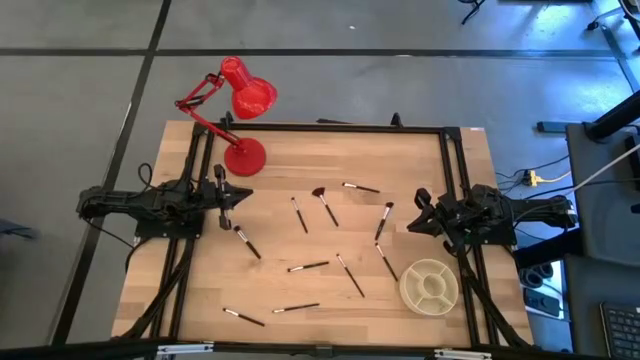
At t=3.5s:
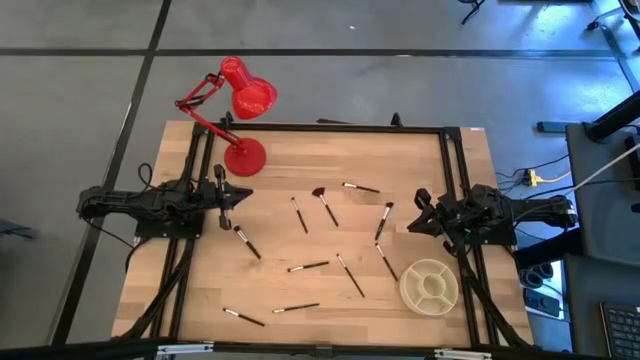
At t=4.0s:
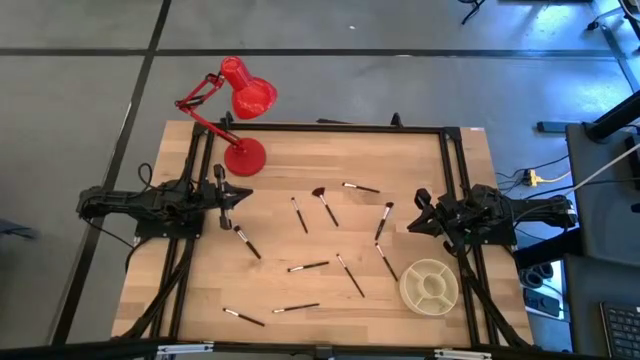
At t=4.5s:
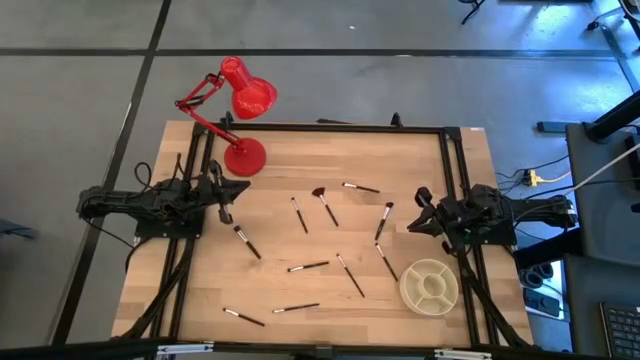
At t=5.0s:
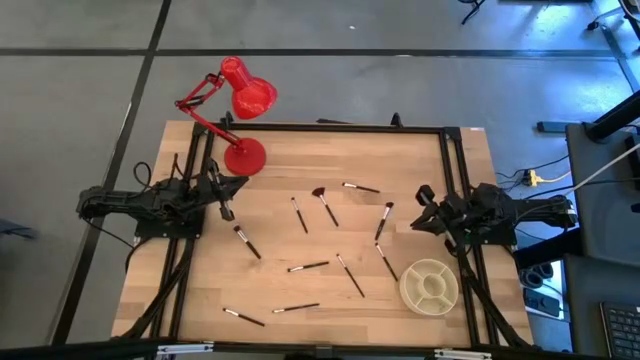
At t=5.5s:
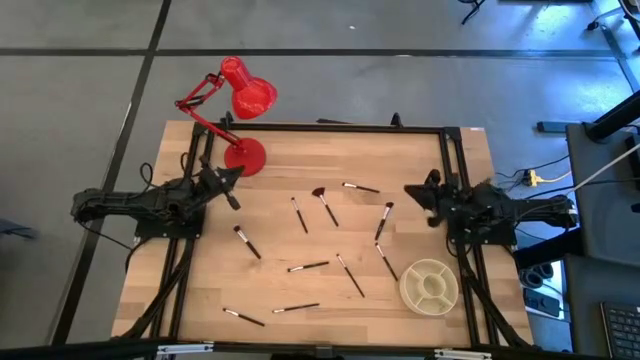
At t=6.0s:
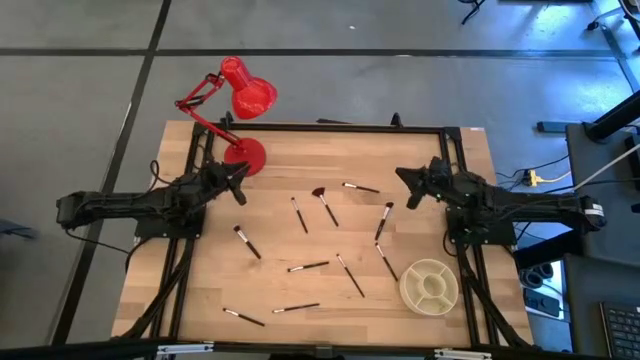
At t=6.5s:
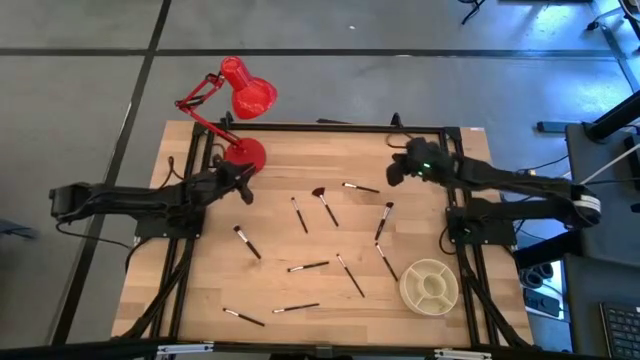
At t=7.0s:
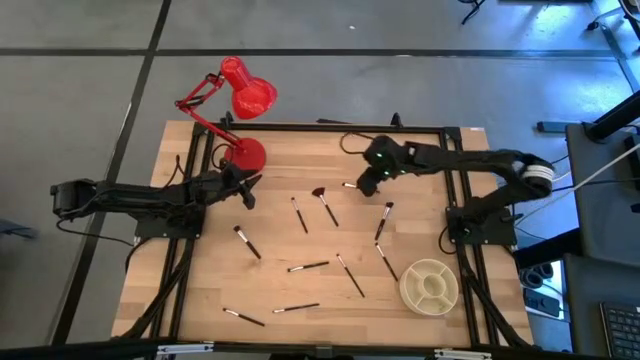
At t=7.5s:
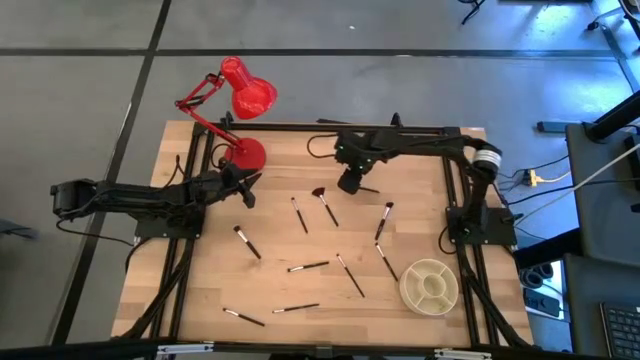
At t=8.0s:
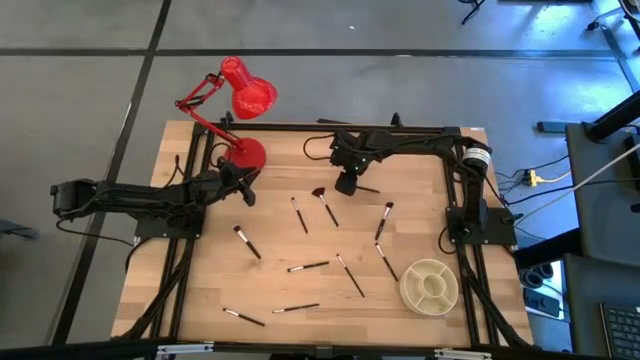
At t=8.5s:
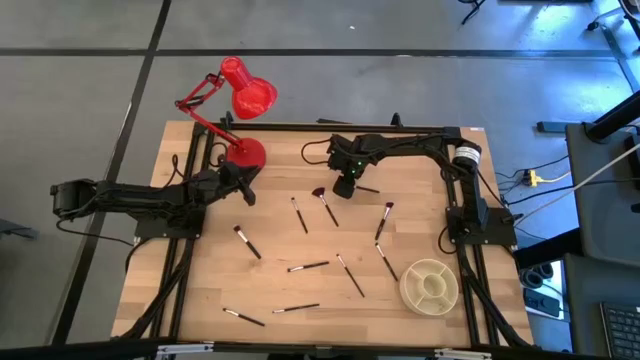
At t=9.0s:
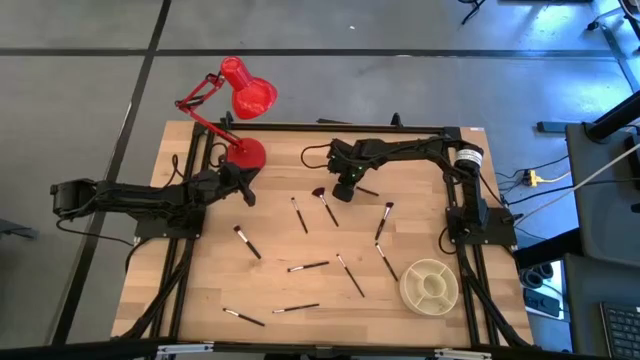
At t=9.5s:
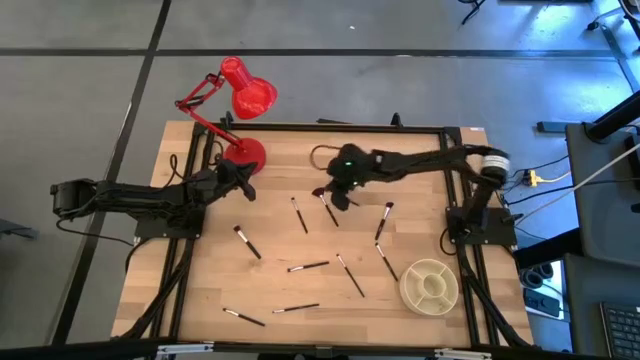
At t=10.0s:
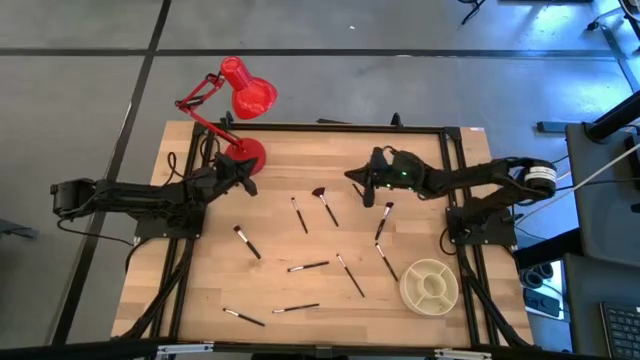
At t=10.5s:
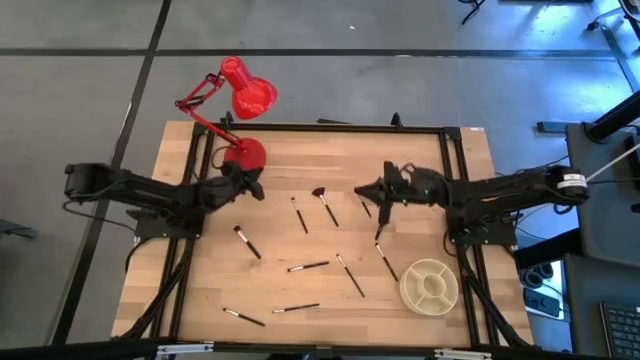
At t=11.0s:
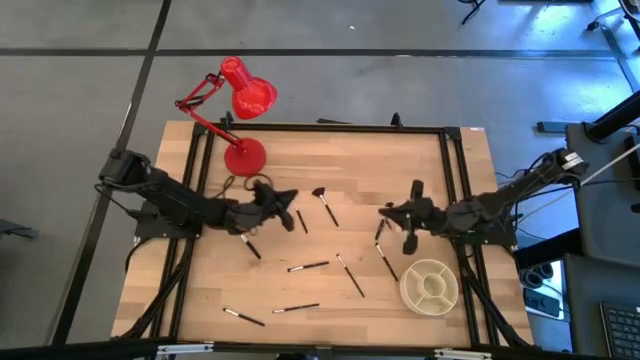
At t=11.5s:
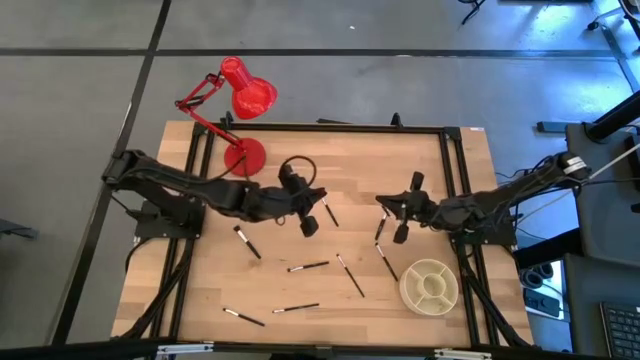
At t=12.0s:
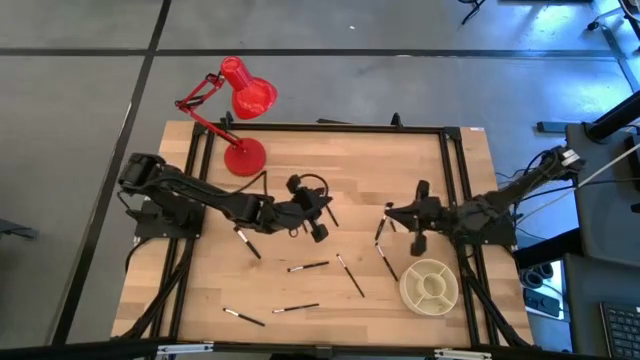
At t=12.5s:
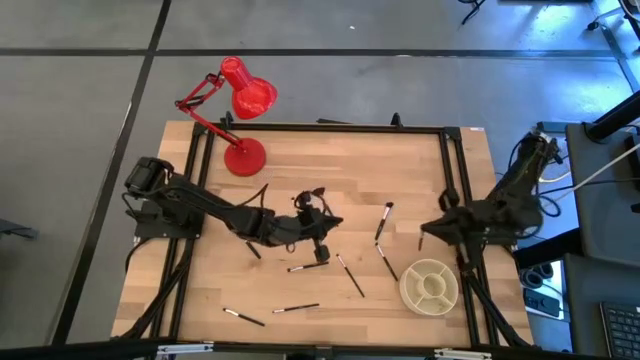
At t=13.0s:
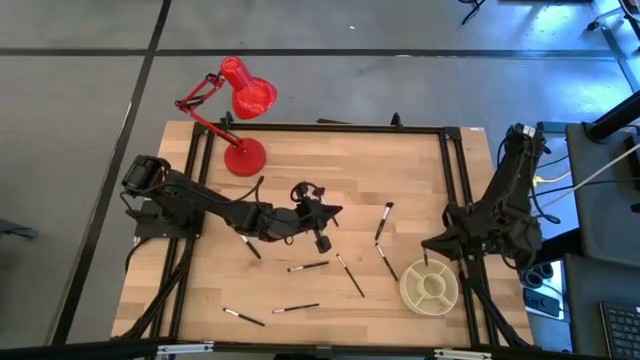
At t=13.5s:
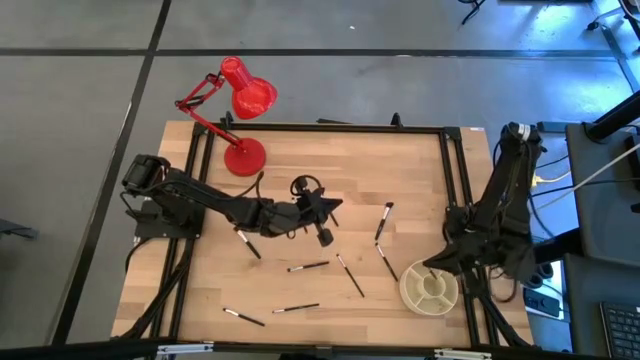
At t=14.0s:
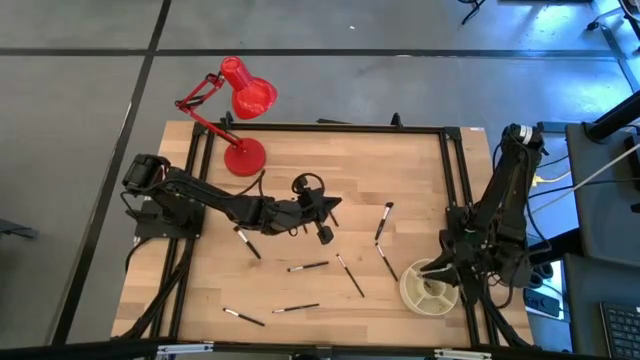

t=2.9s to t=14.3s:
Task: Sort items
Put the eyeshadow brush into the brush organizer

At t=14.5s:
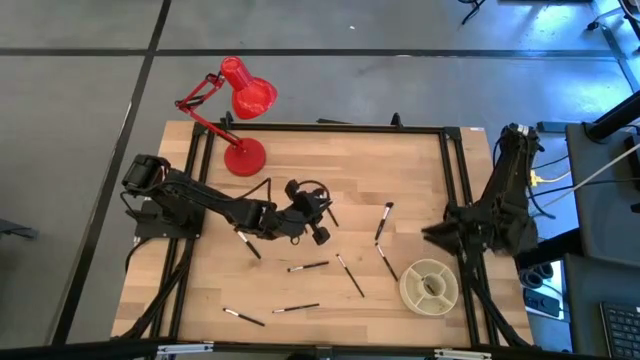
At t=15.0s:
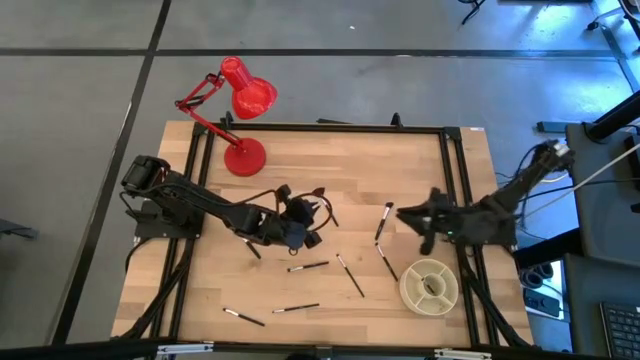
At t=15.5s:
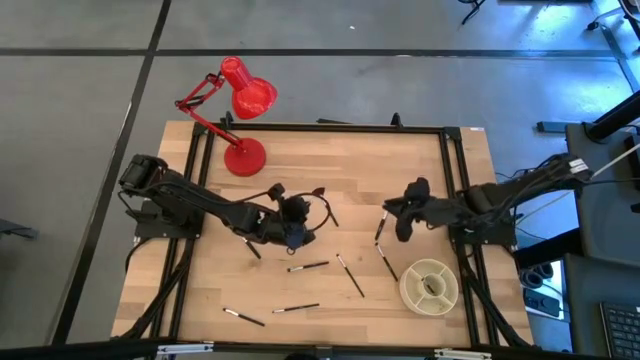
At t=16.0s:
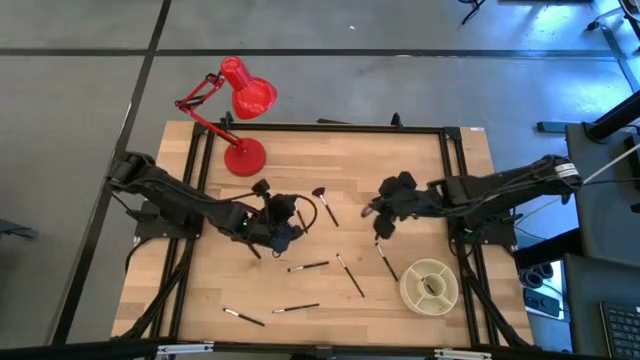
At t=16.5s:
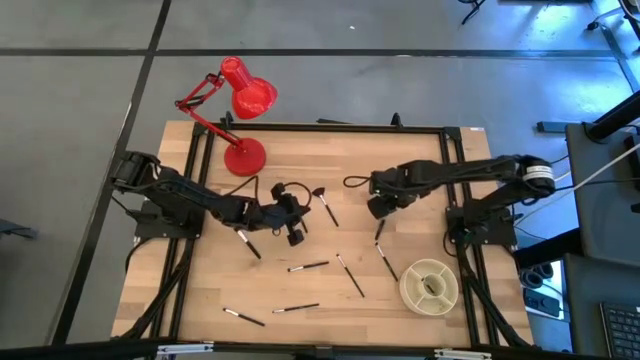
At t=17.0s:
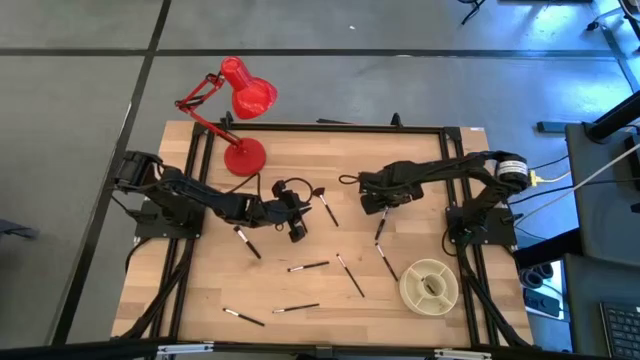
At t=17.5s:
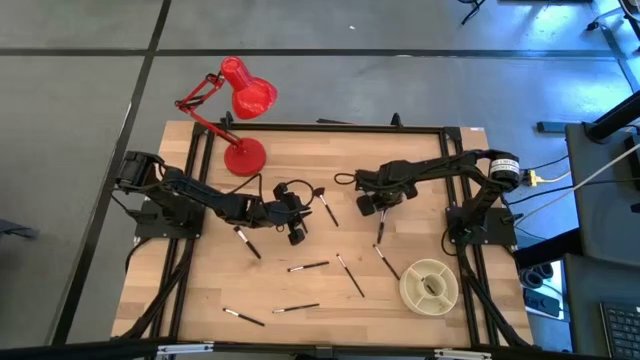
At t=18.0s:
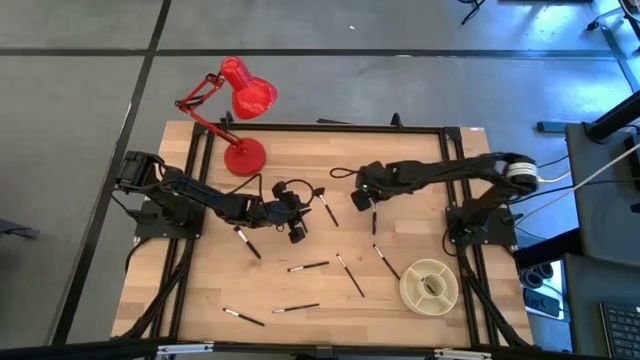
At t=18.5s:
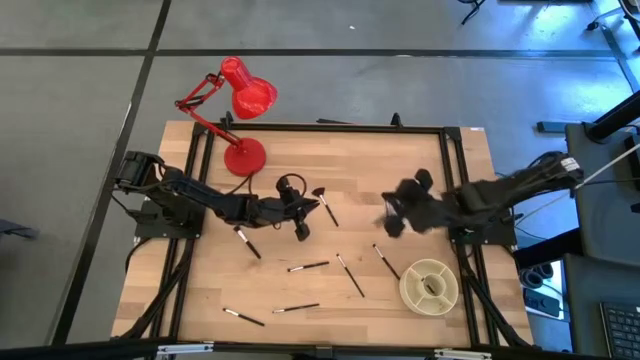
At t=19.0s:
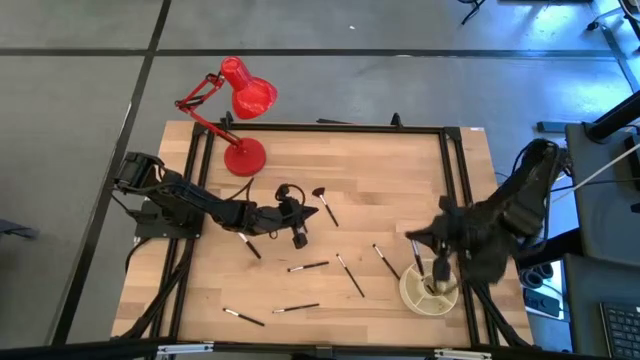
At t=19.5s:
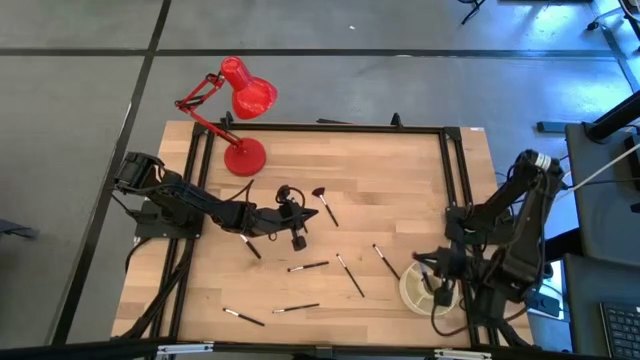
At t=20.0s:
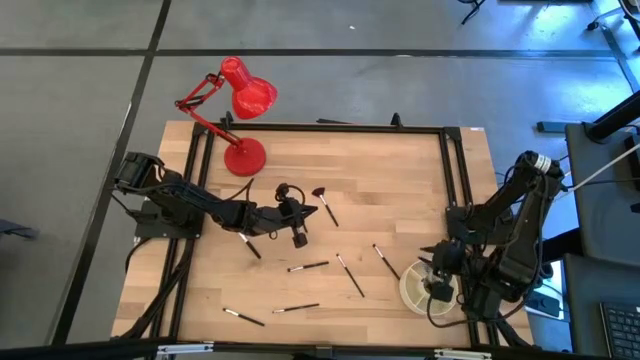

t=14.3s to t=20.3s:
Put the powder brush into the brush organizer

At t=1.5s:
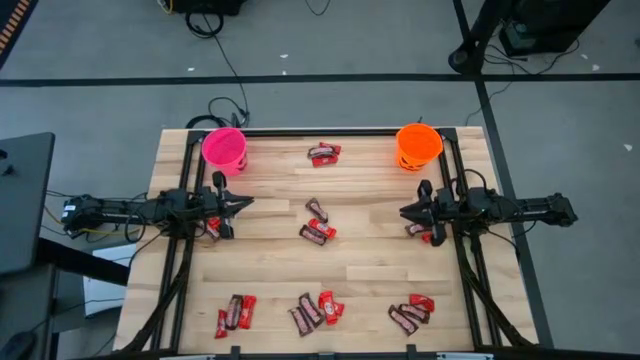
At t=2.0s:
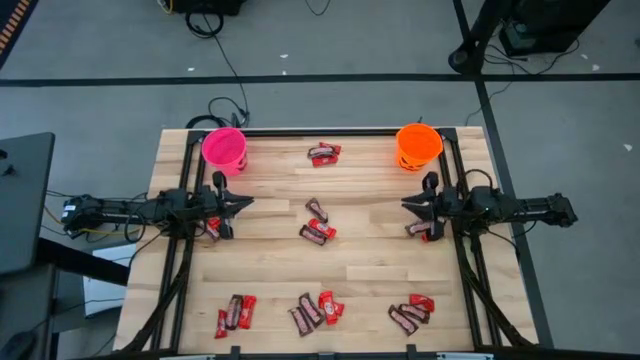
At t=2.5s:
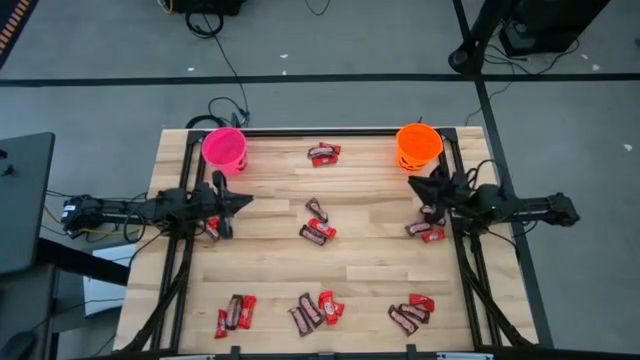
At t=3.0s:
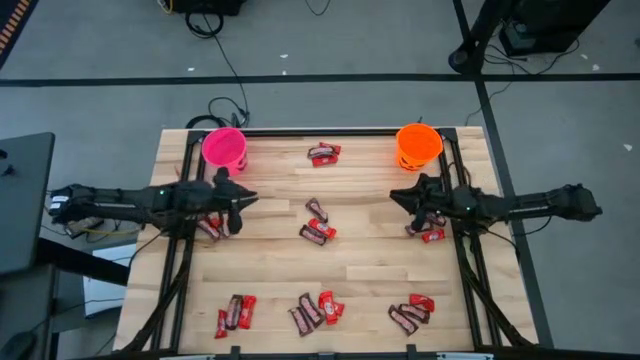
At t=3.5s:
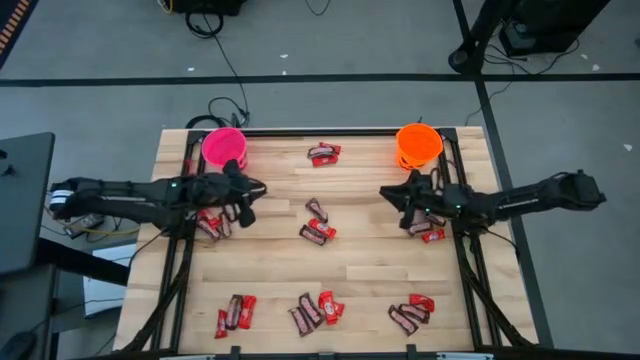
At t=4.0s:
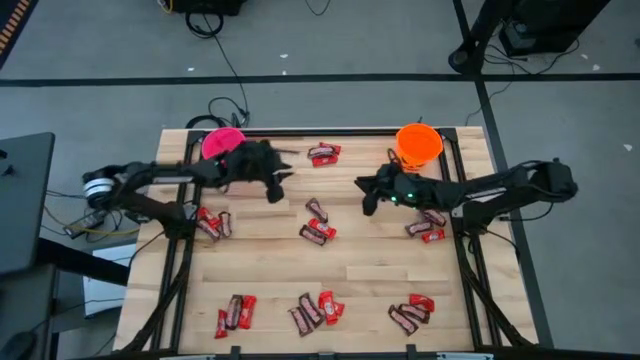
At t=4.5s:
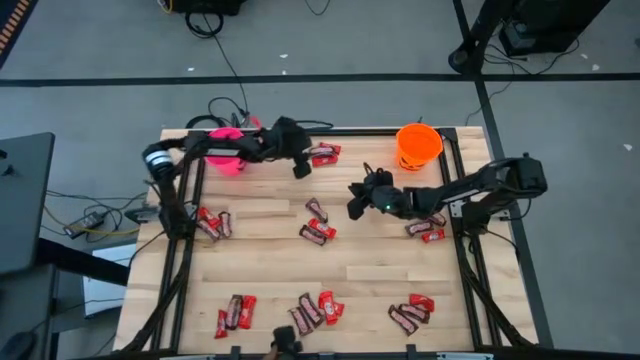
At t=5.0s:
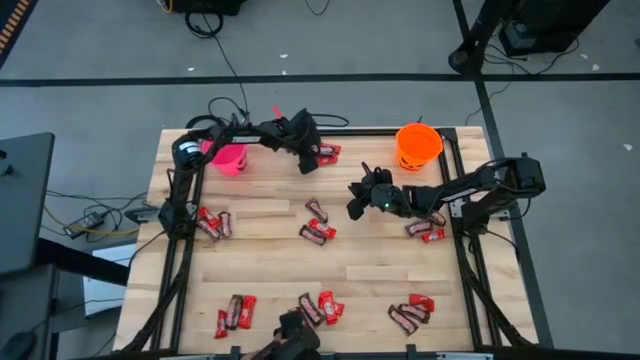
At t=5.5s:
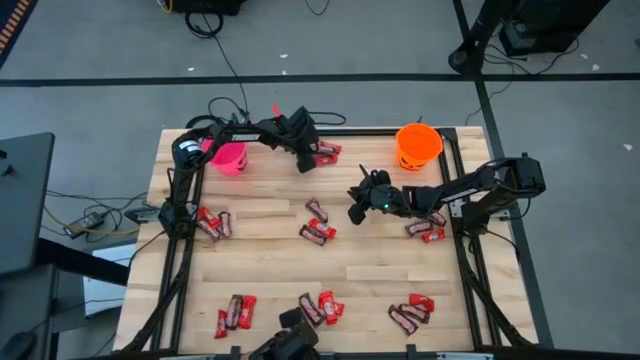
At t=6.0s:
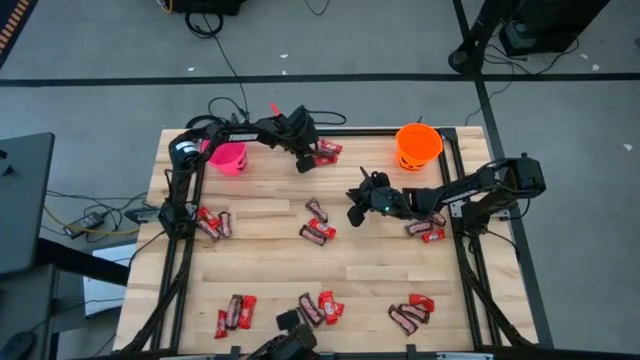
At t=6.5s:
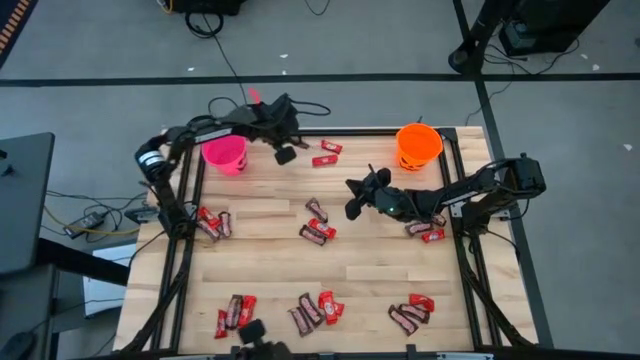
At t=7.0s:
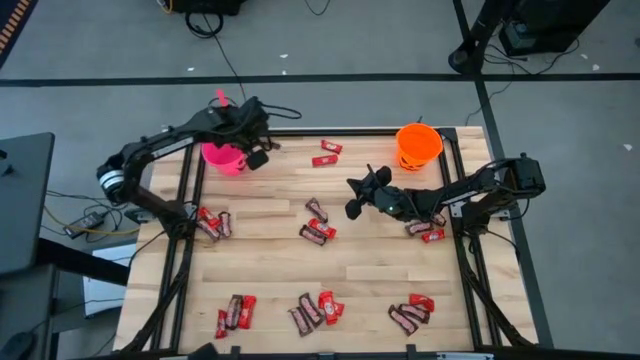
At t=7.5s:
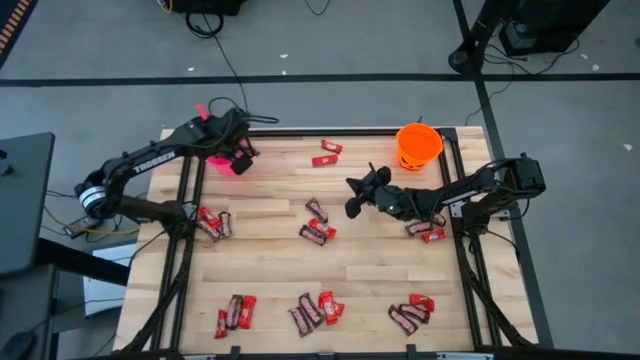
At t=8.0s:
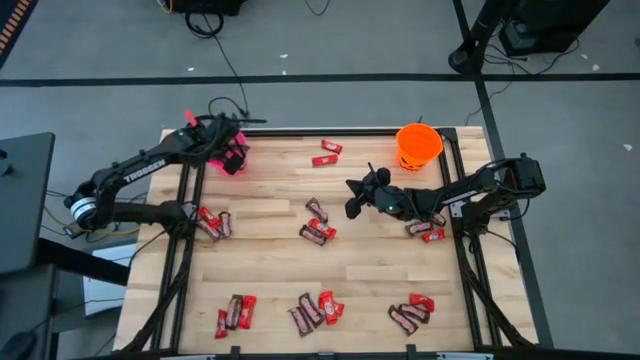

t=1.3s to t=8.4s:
Task: Sort candy by brand, put in halloween buckets
Put the brown chocolate bar into the pink bucket
